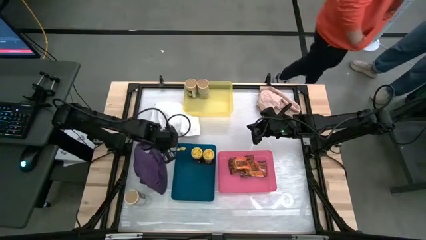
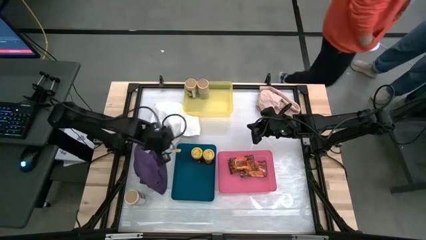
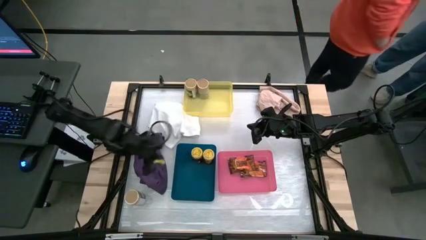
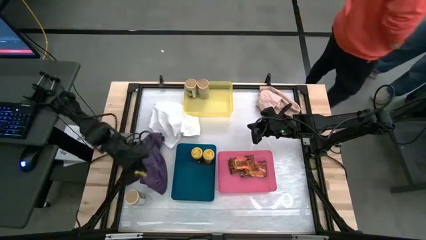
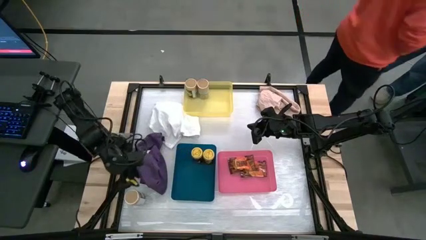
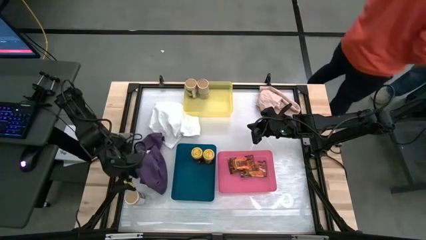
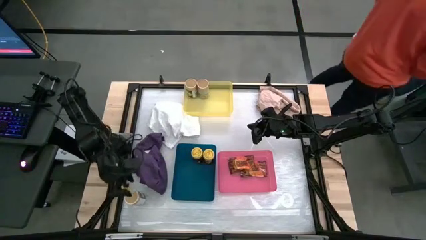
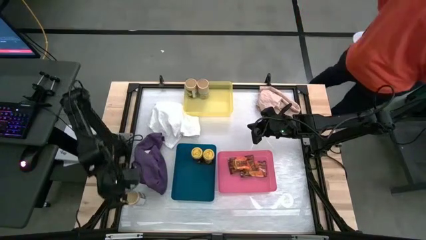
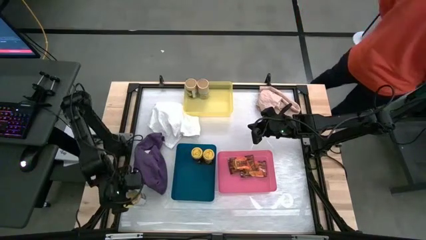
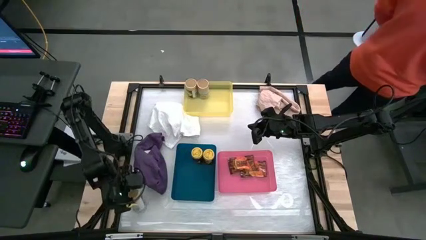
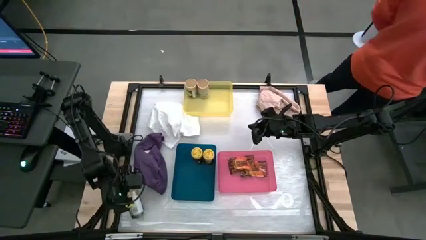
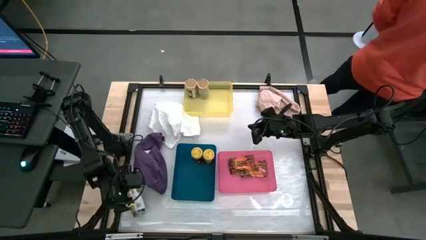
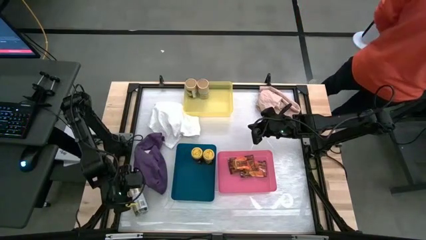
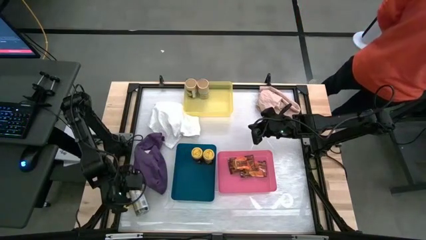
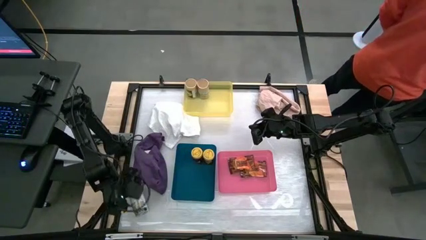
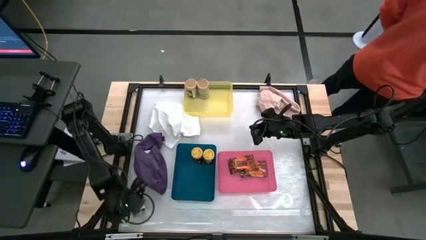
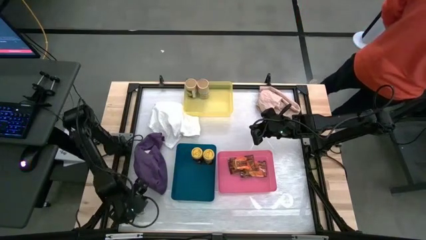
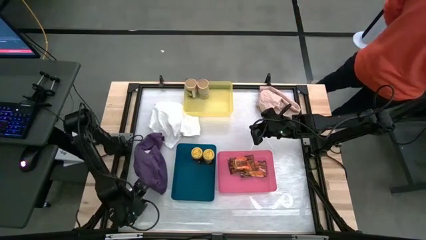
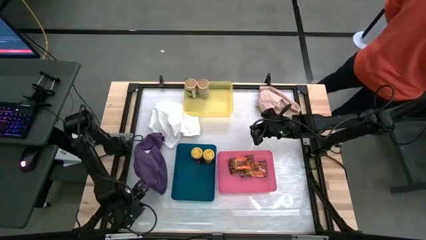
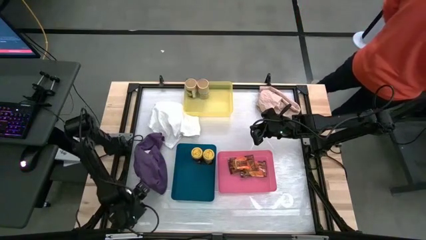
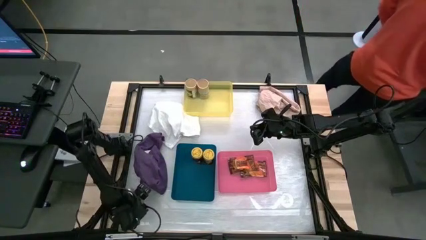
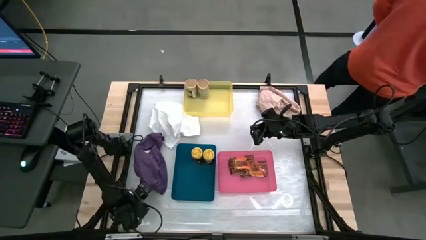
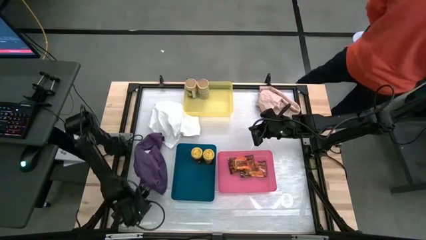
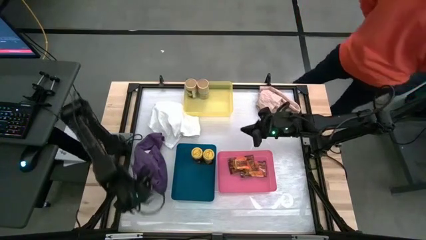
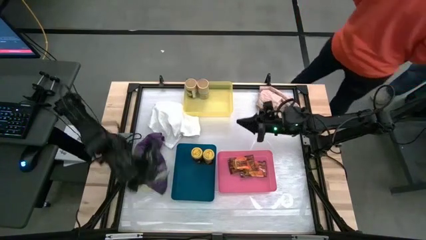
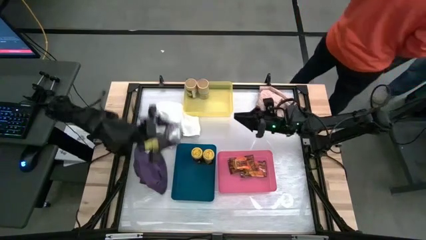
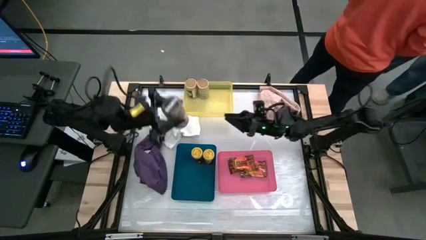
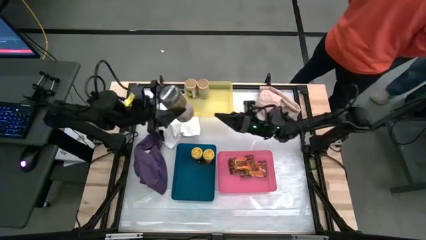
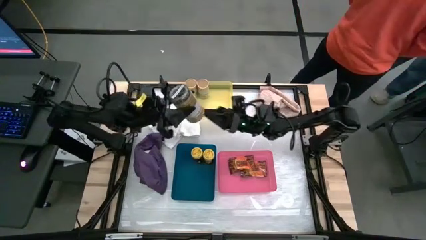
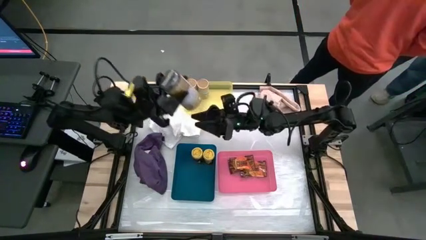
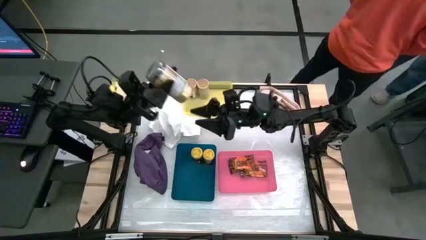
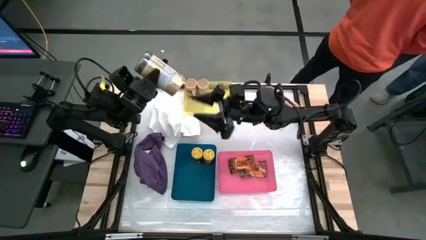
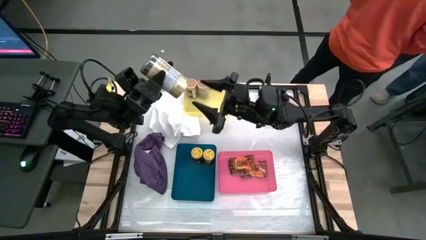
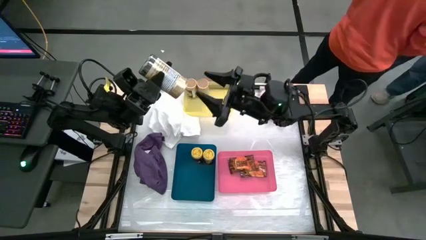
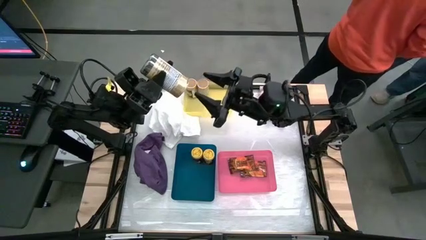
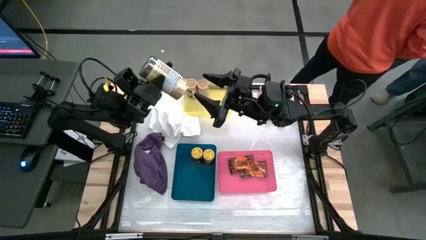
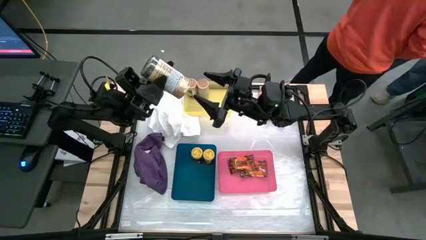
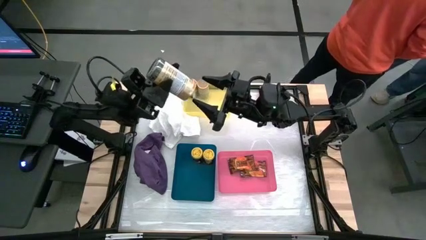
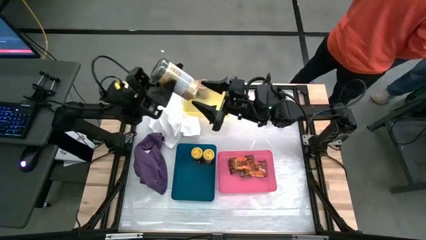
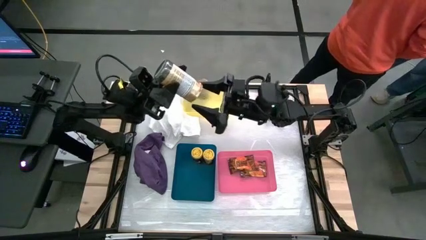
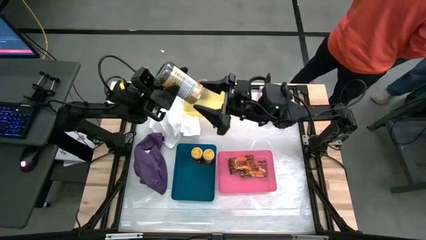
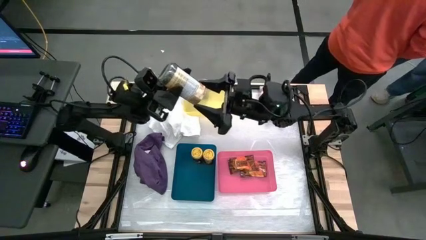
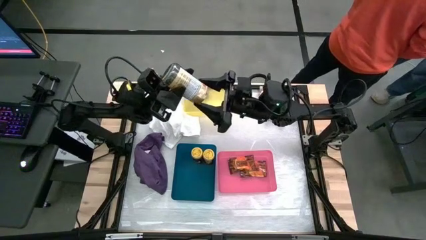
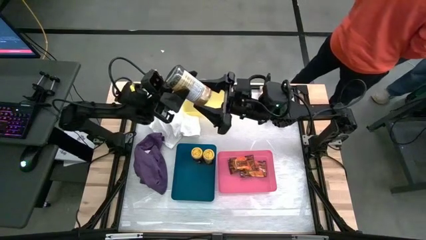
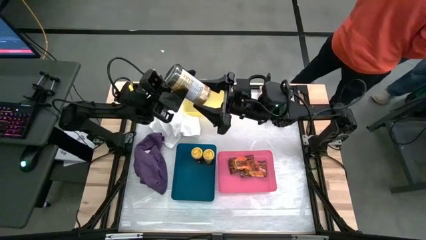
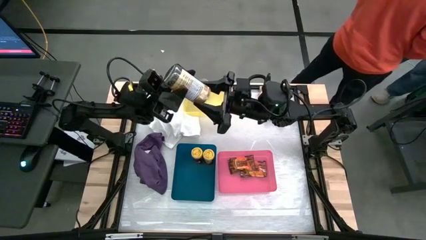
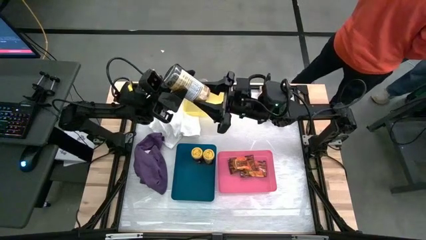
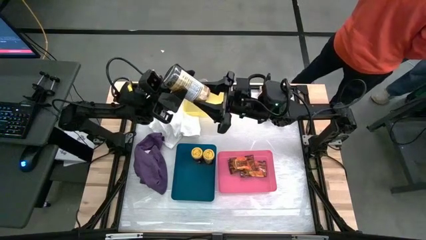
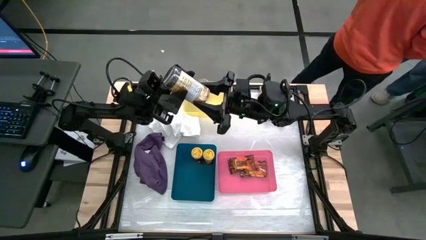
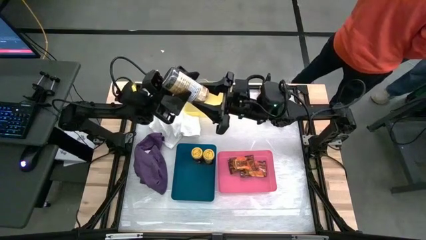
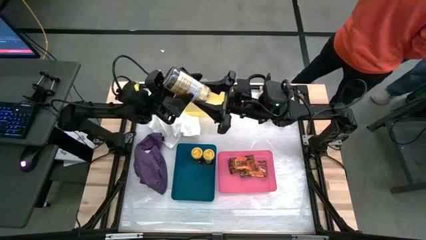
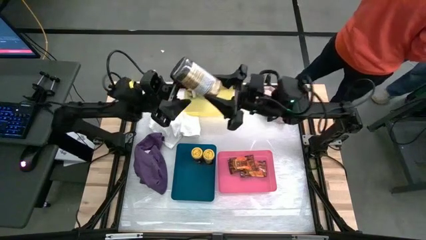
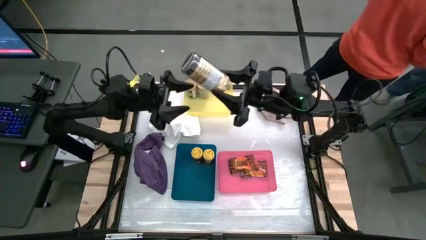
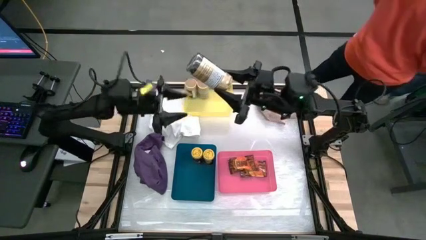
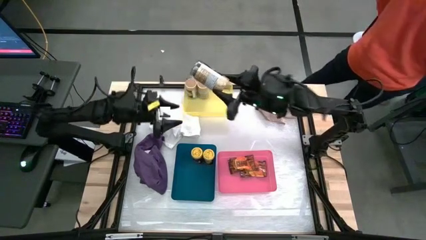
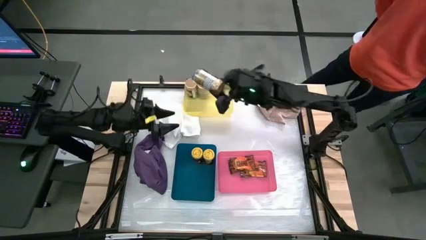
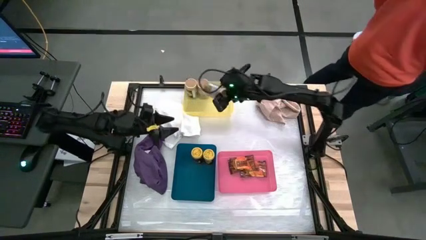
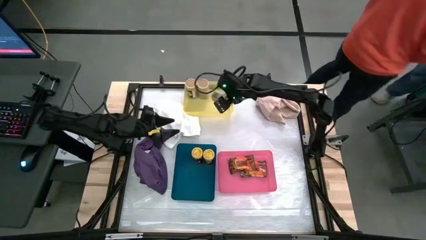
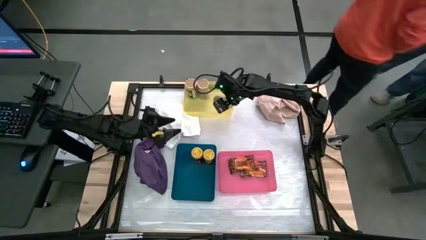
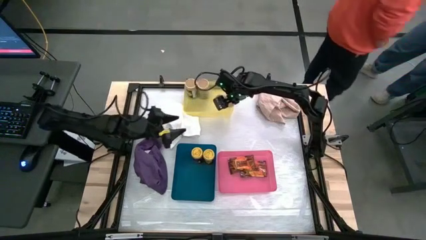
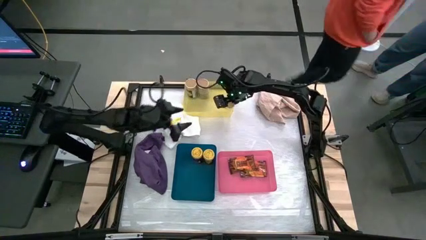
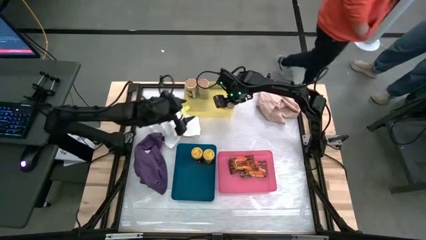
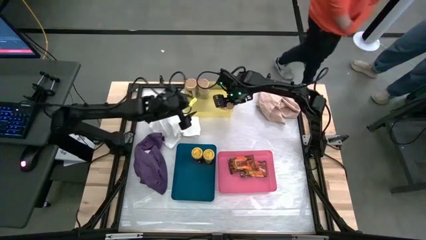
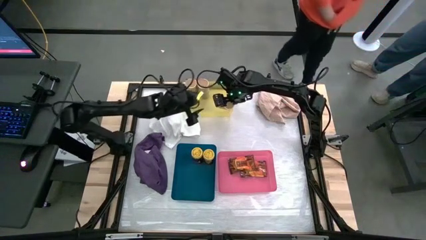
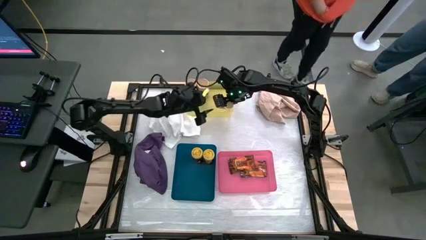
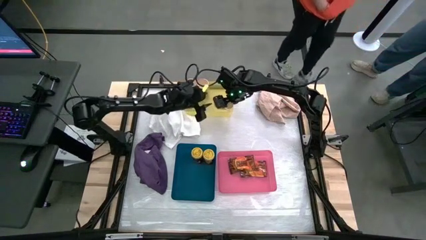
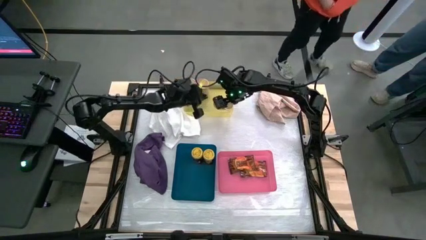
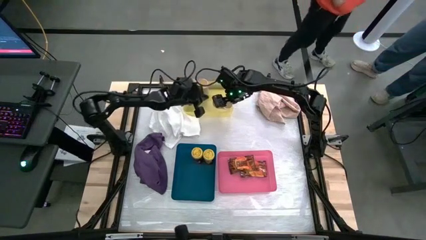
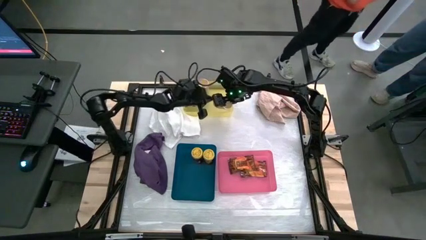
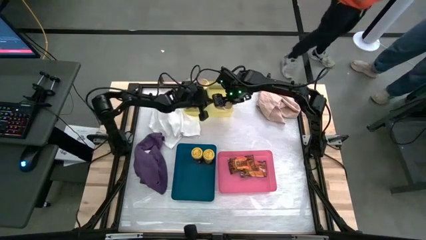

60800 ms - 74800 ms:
Task: Sort spices by type
Put the golden seasoning bottle into the yellow bin aligned with the other golden seasoning bottles
